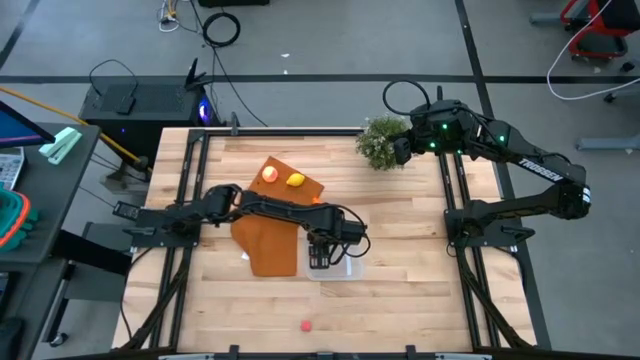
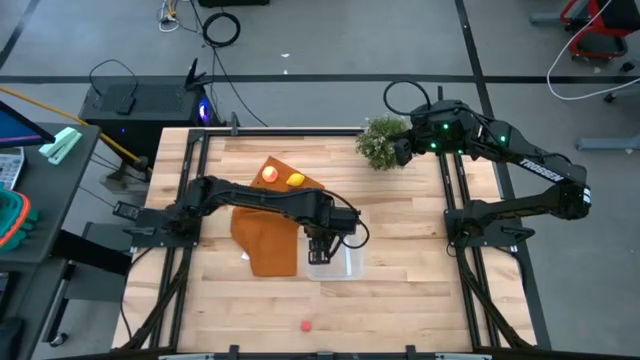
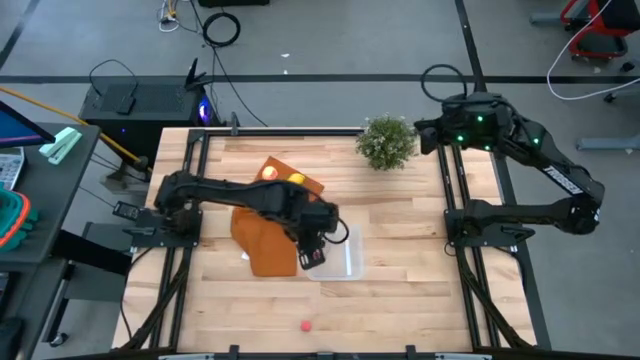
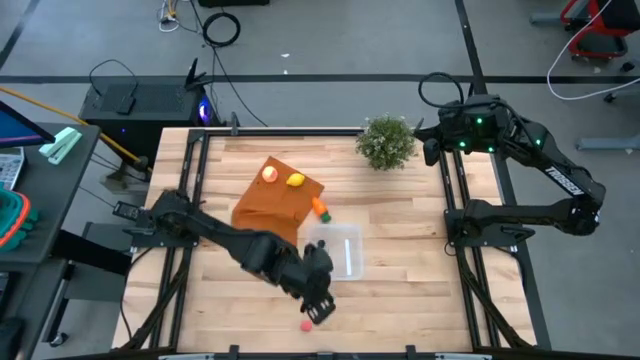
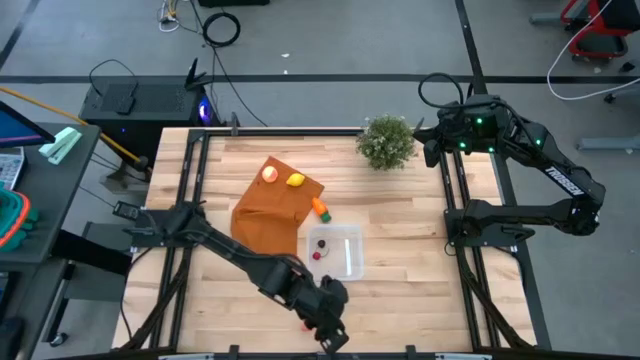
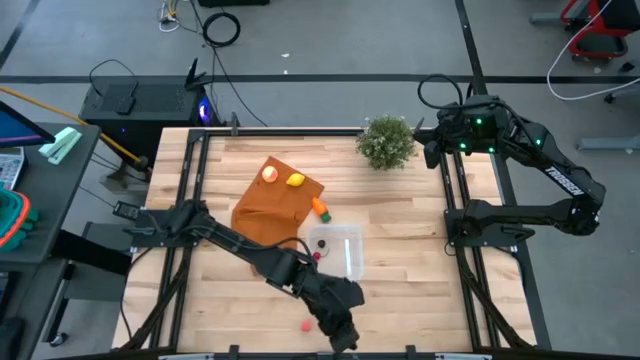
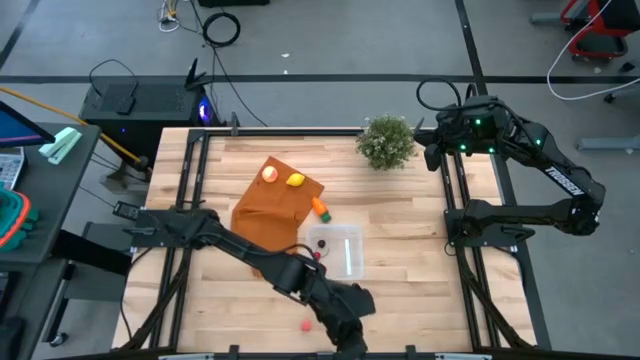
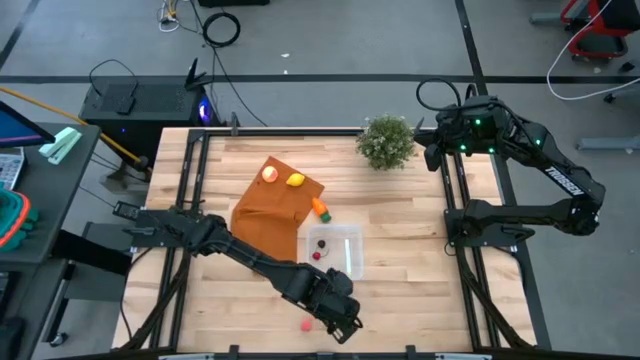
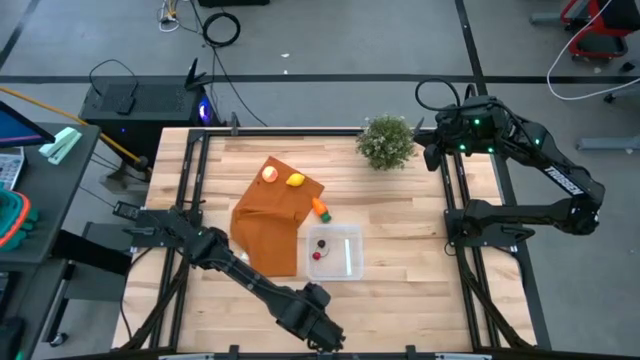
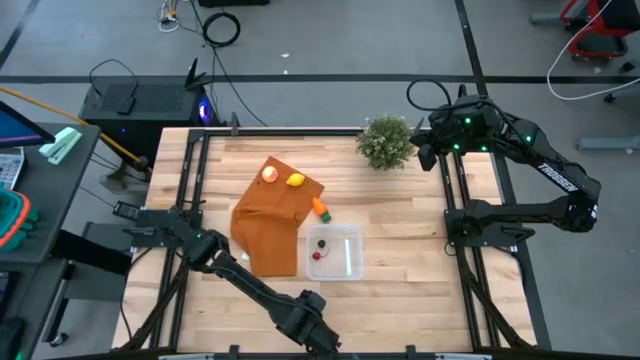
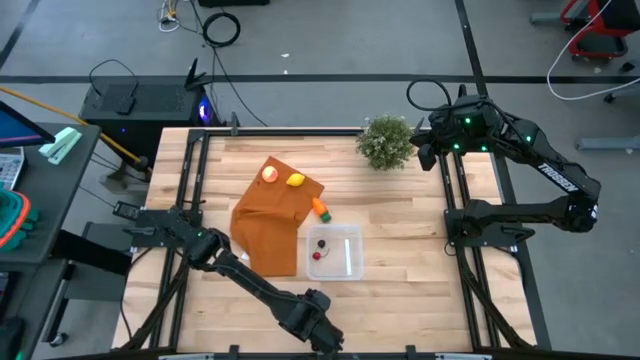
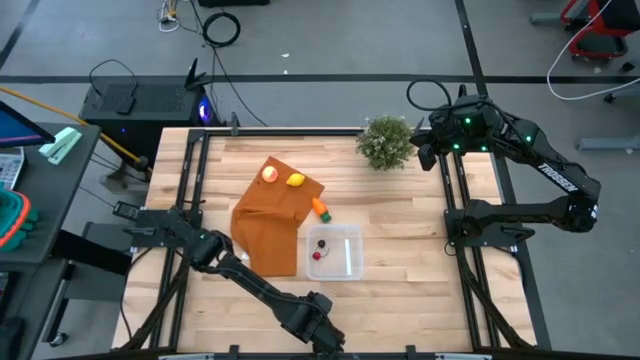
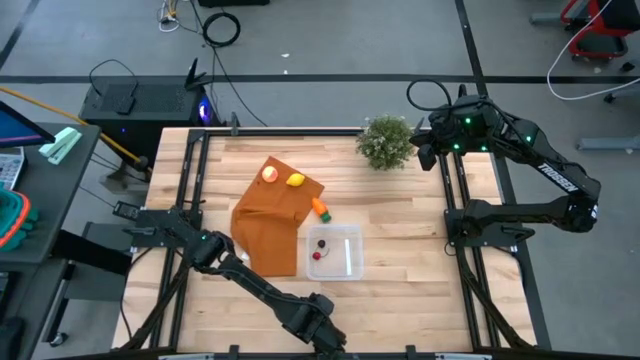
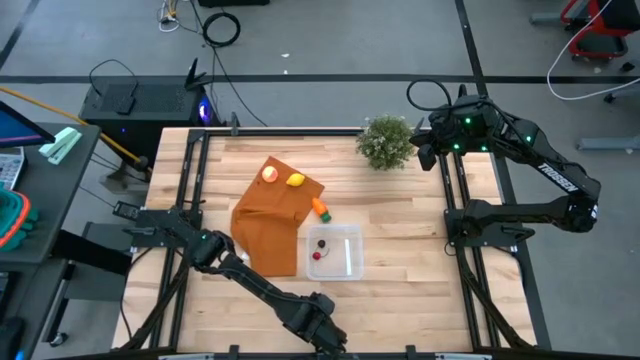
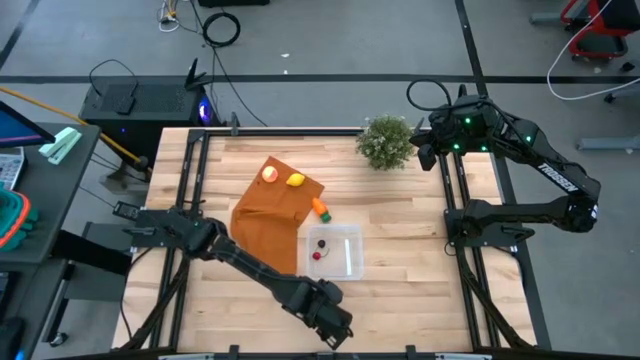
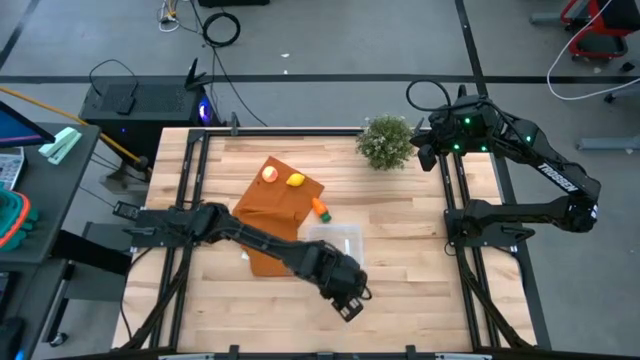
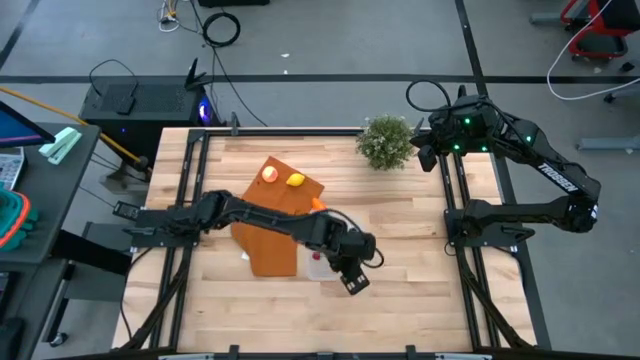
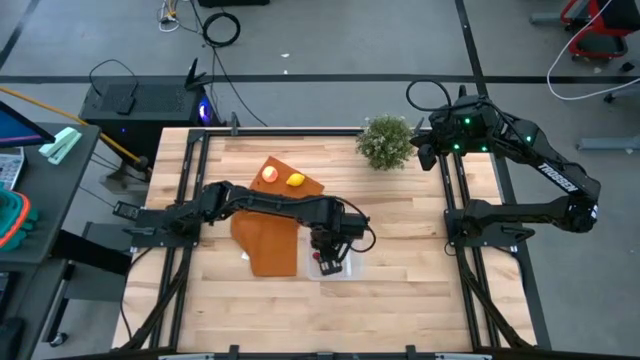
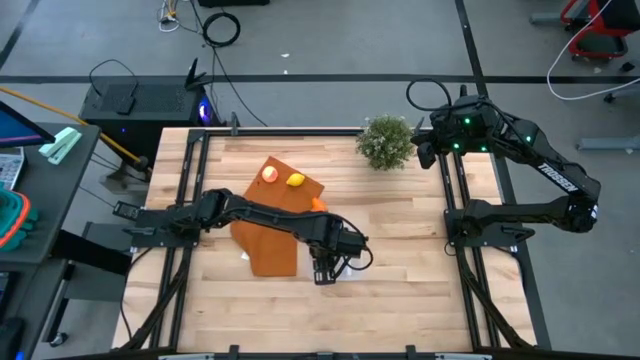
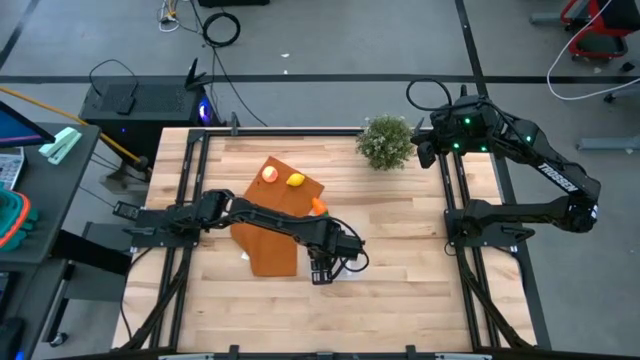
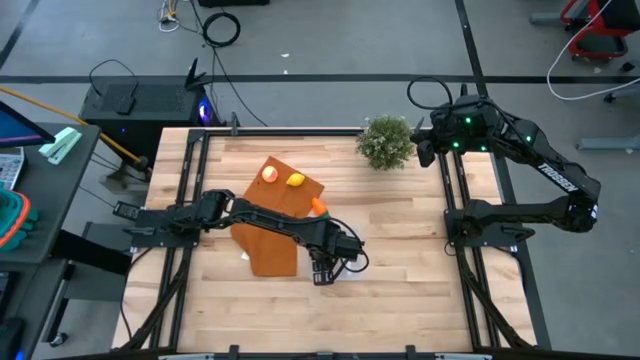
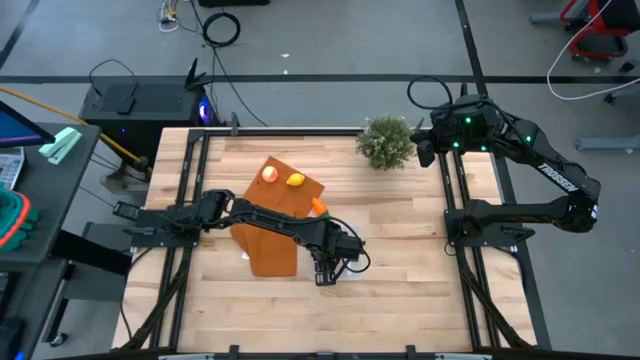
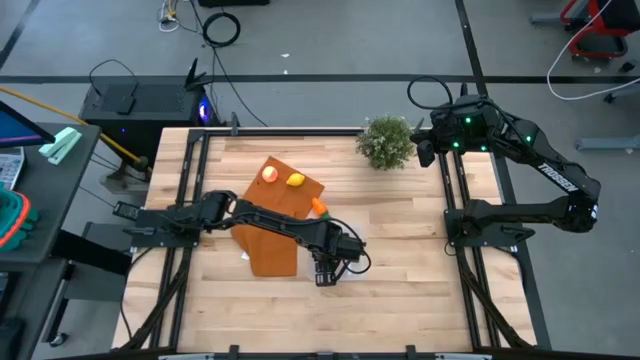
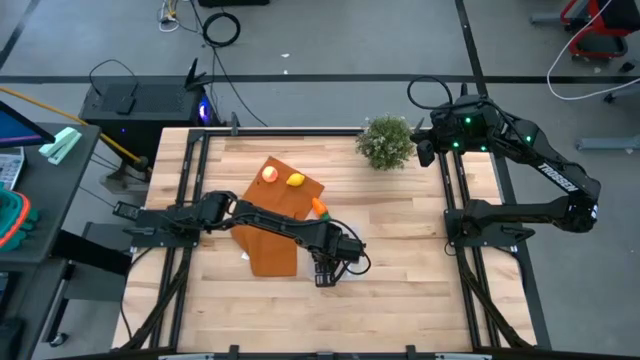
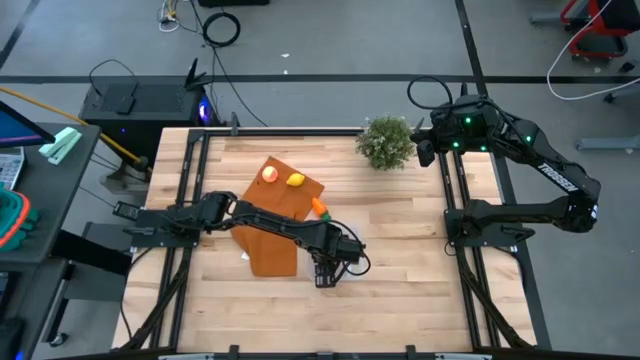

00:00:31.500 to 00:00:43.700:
Task: Pick and placing Produce into tupperware
Put the bottom pink peach into the transparent bin

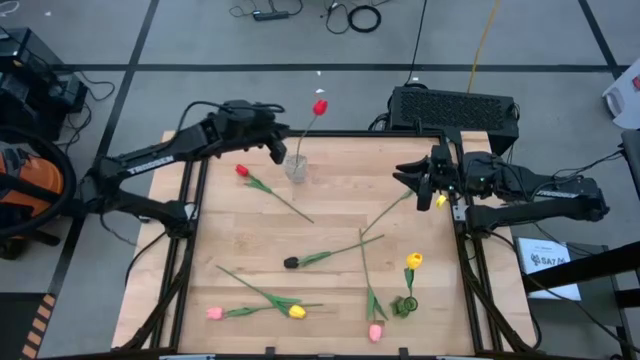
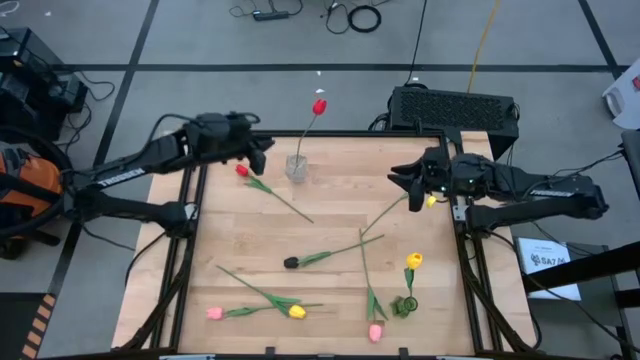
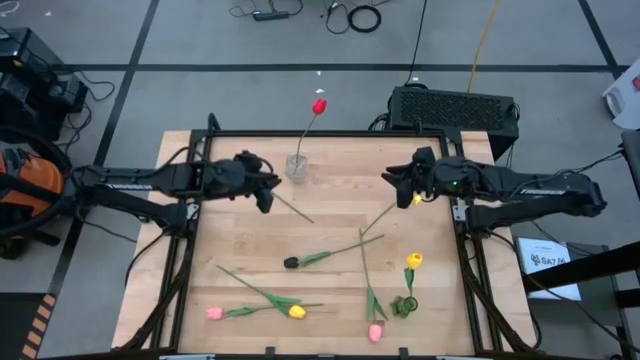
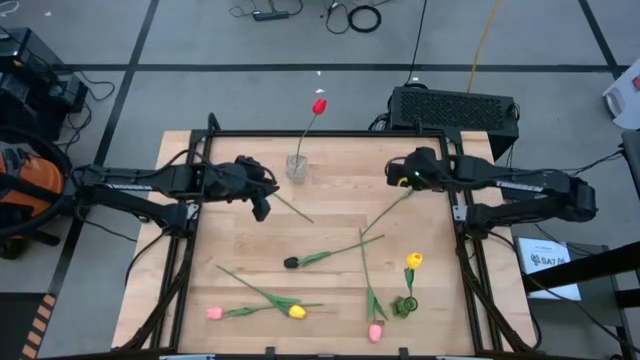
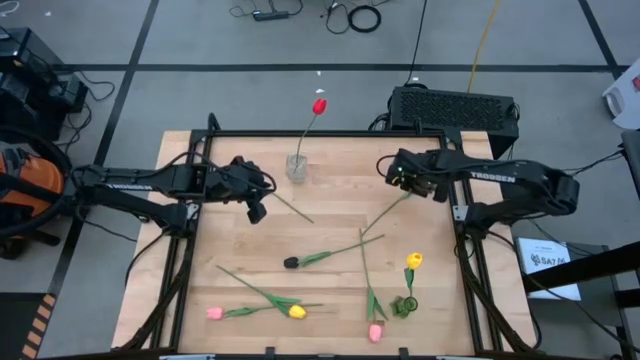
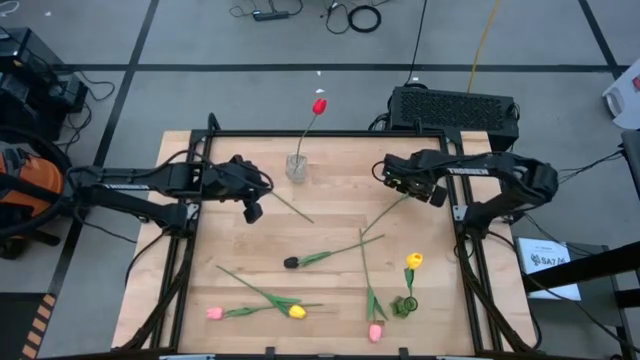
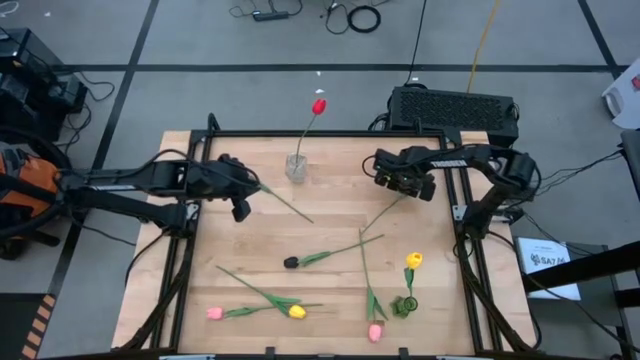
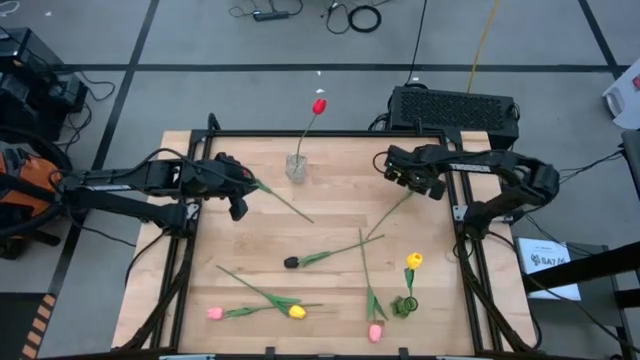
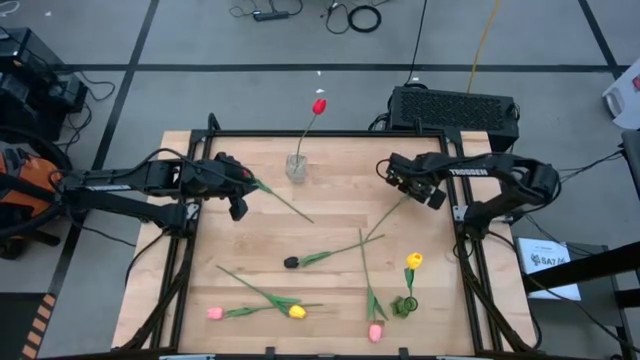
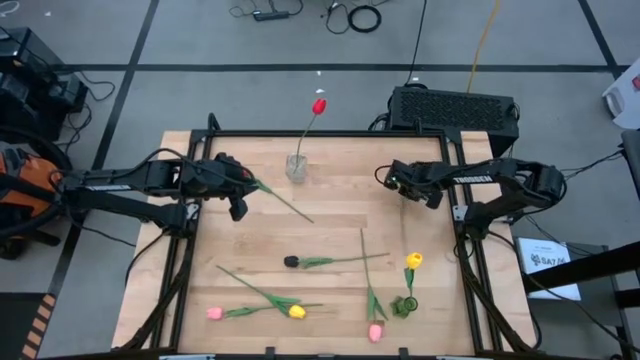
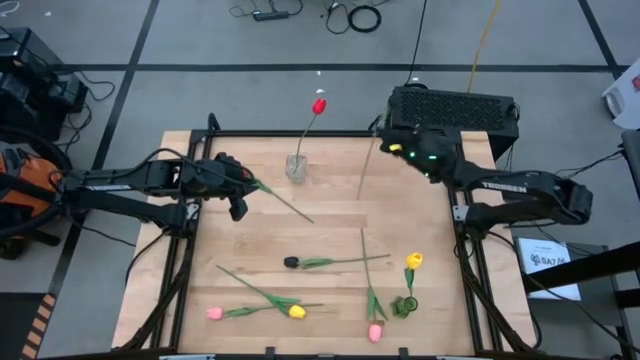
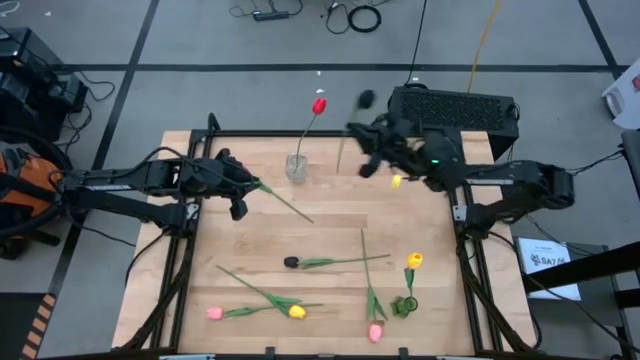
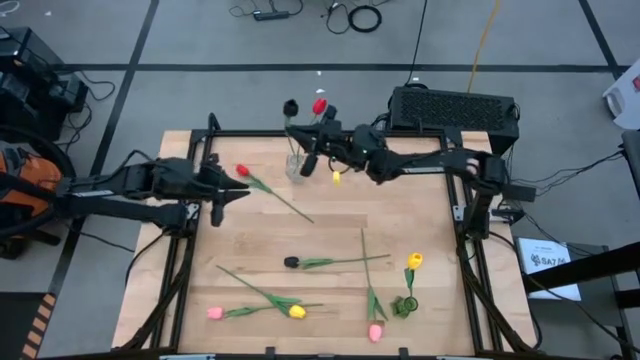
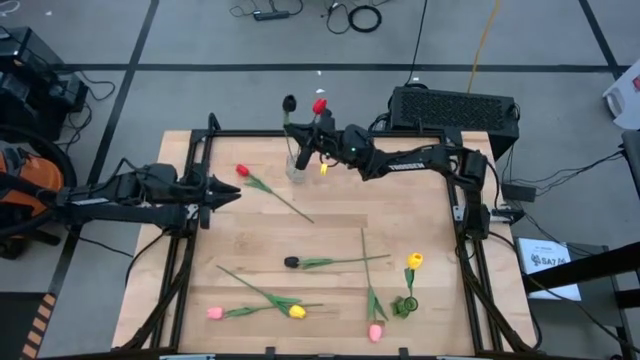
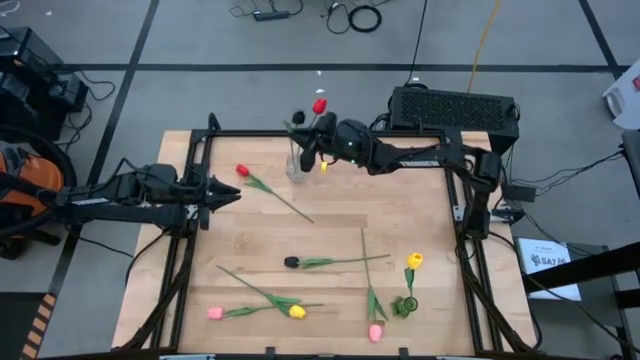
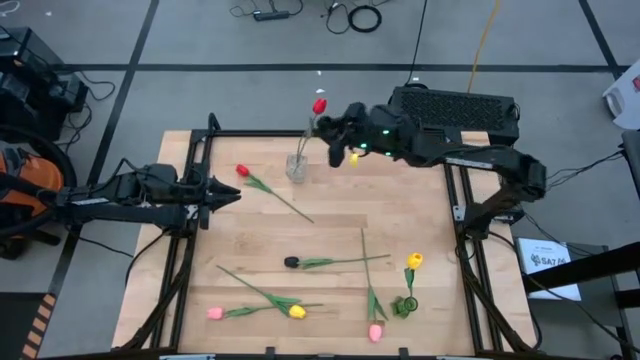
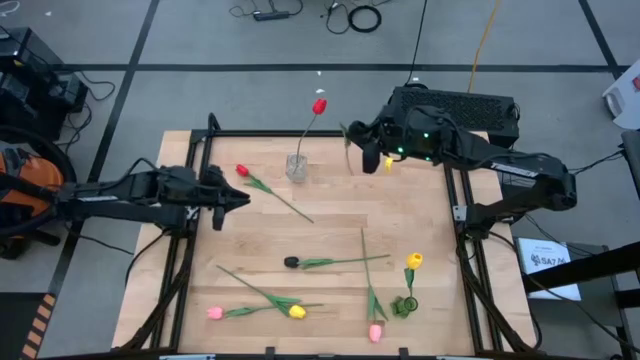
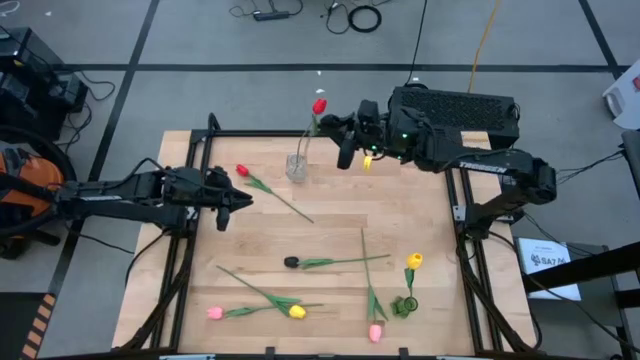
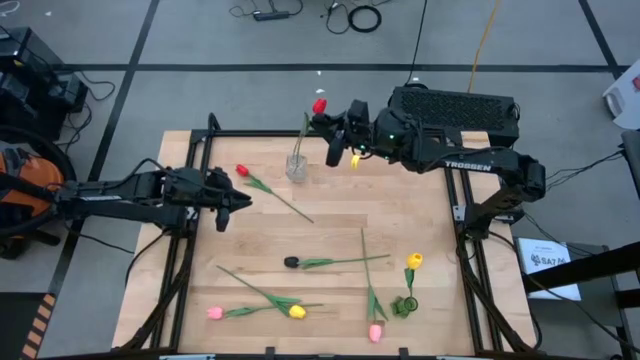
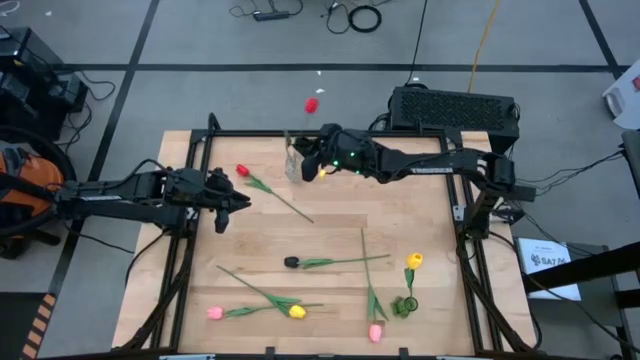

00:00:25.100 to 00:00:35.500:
Task: Sort flowers into vase by color
Put the right black tulip into the transparent flower vase
